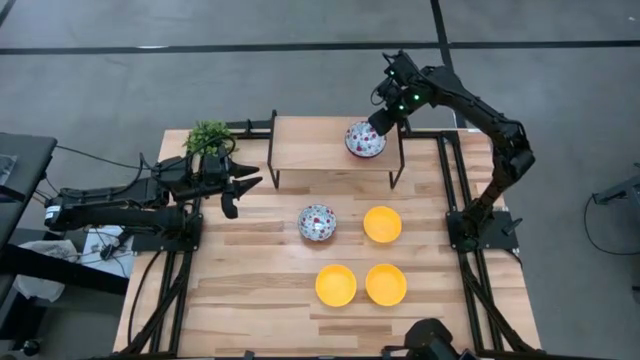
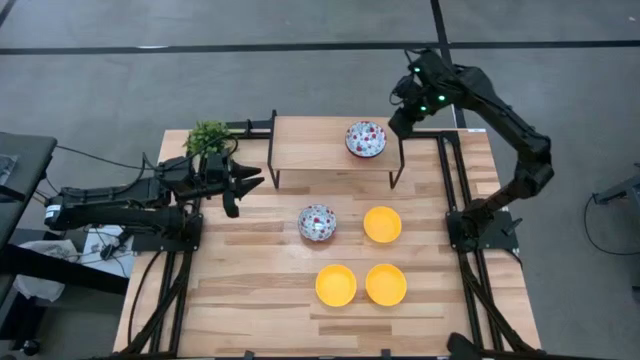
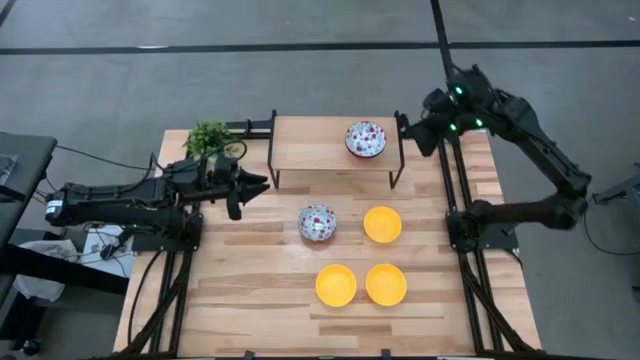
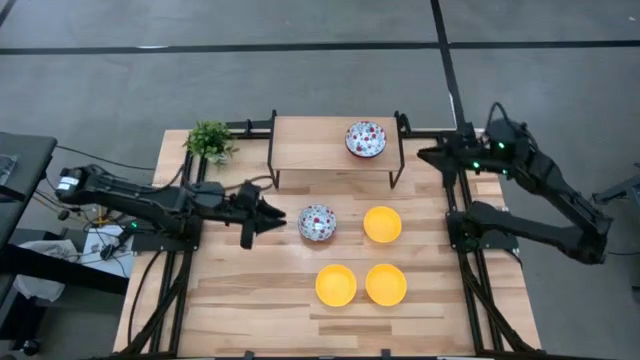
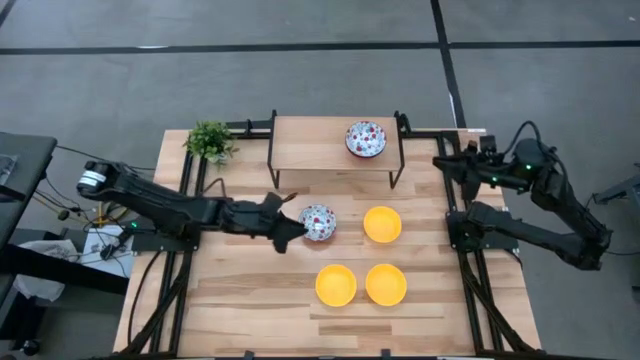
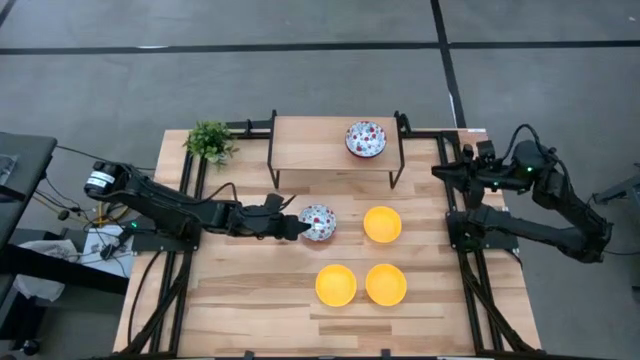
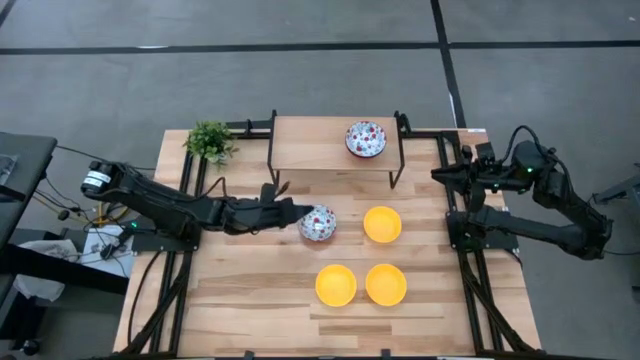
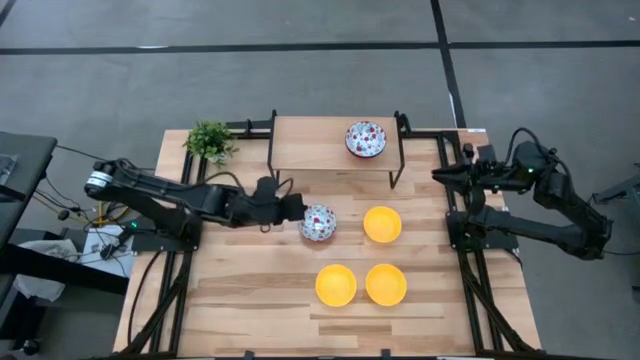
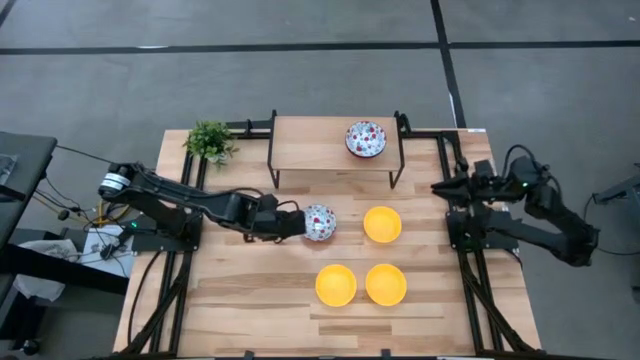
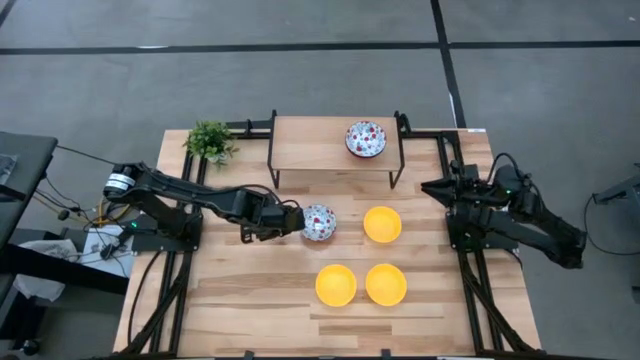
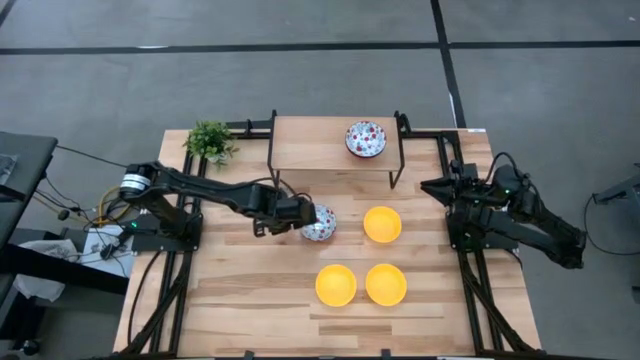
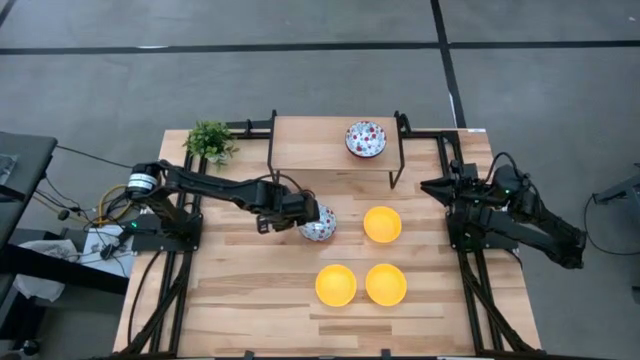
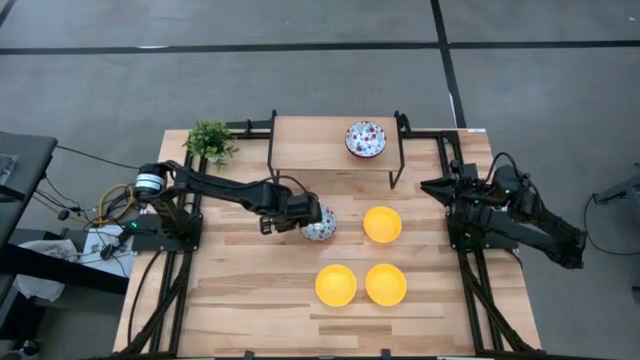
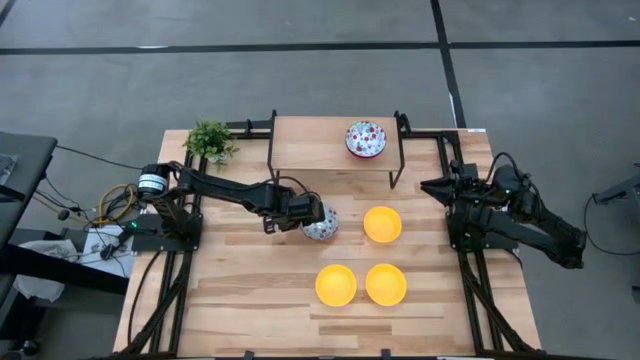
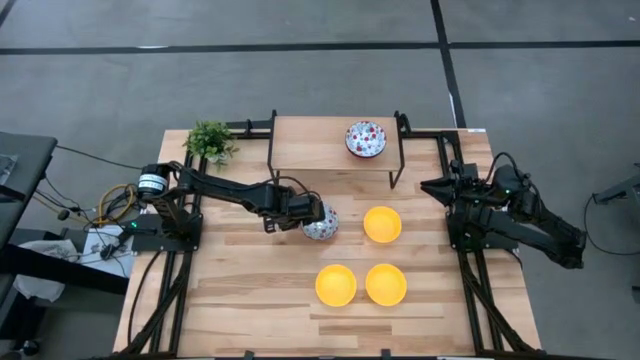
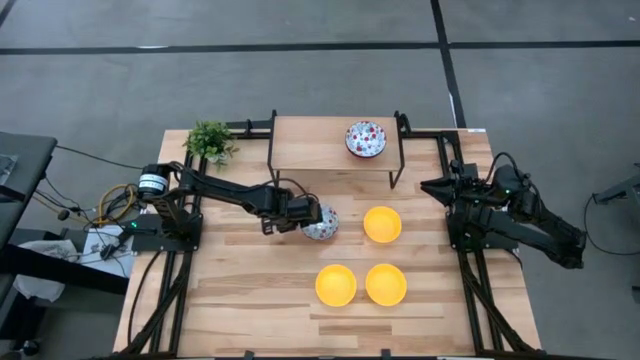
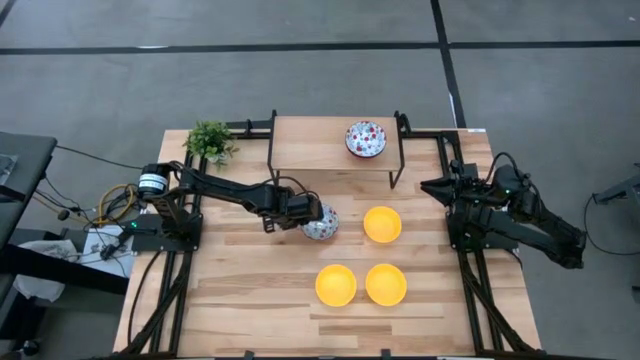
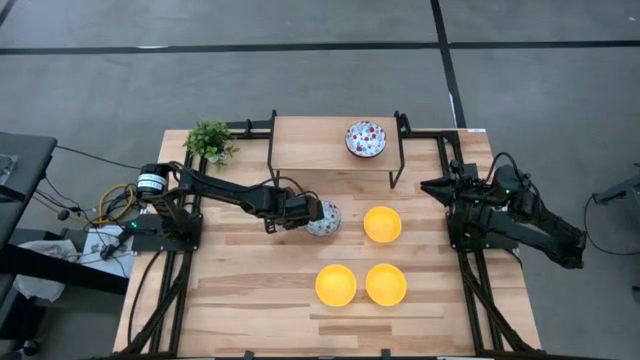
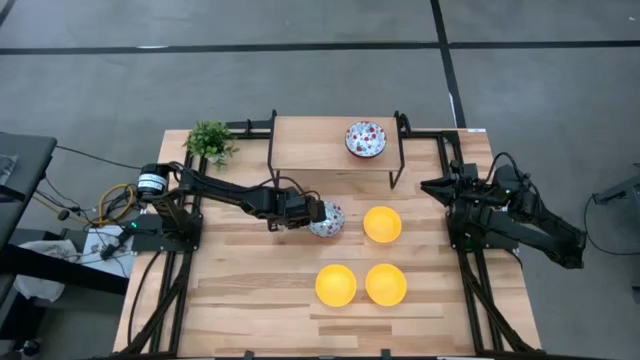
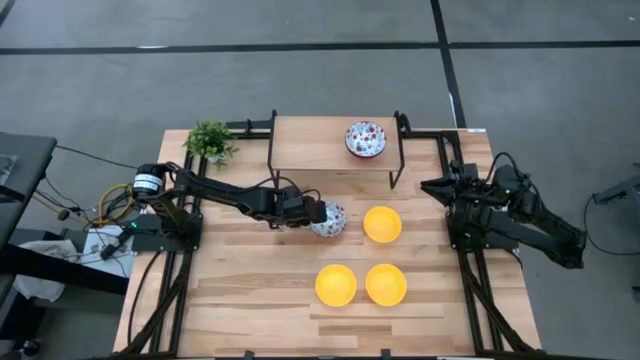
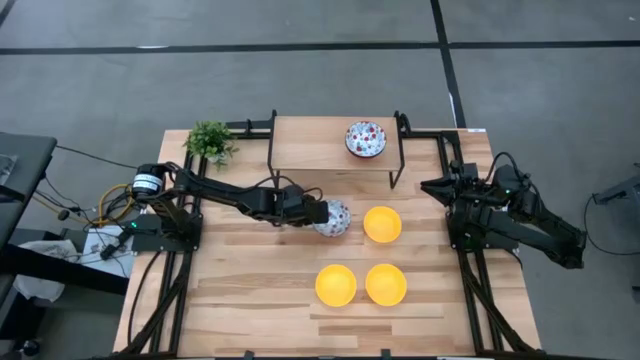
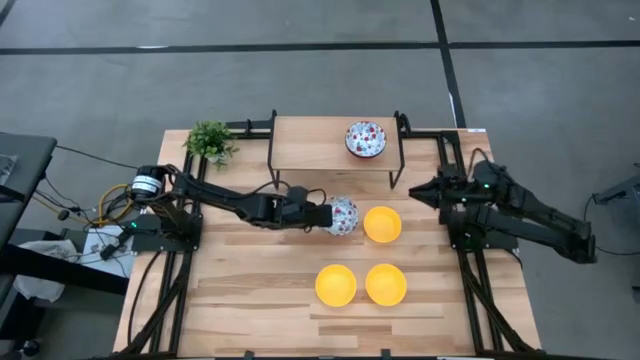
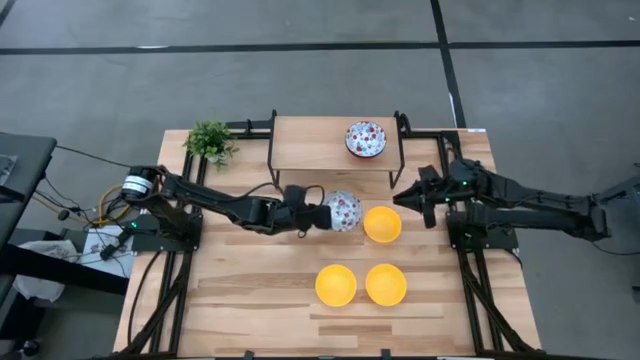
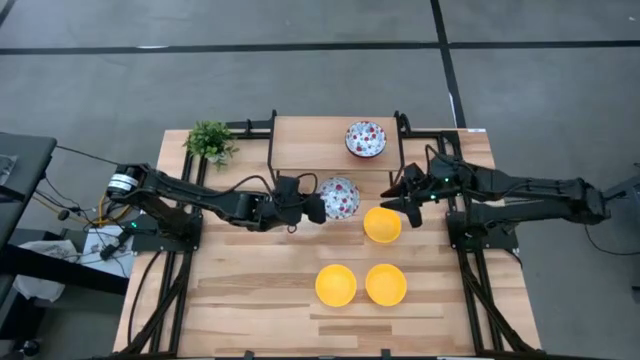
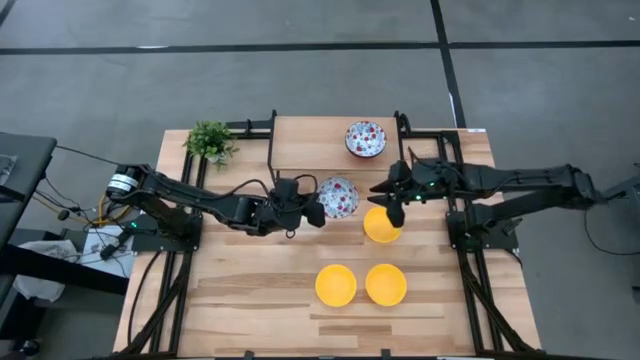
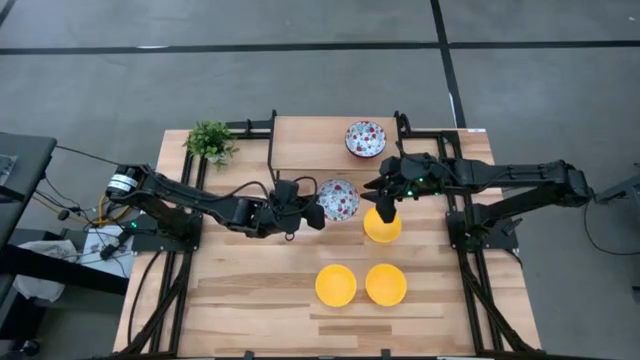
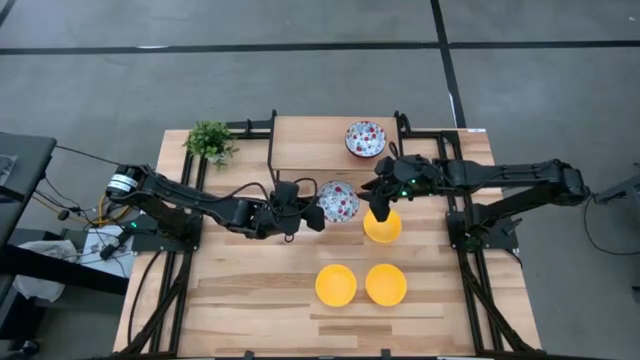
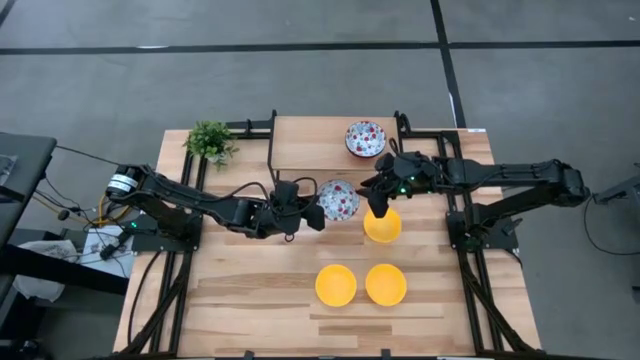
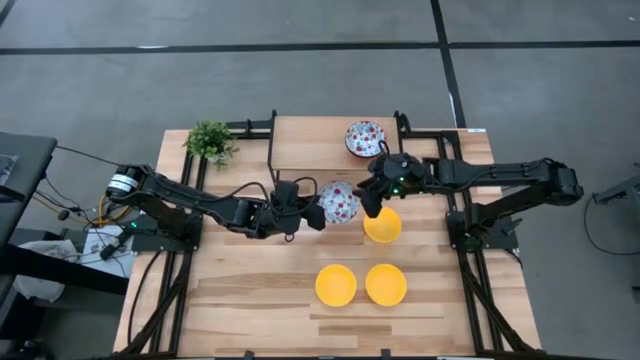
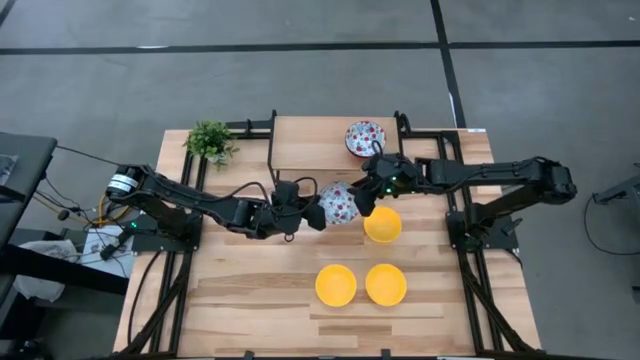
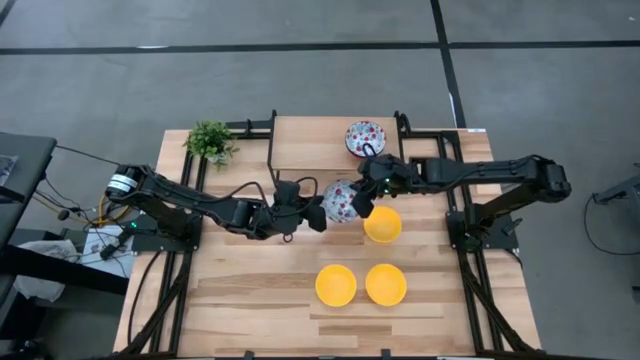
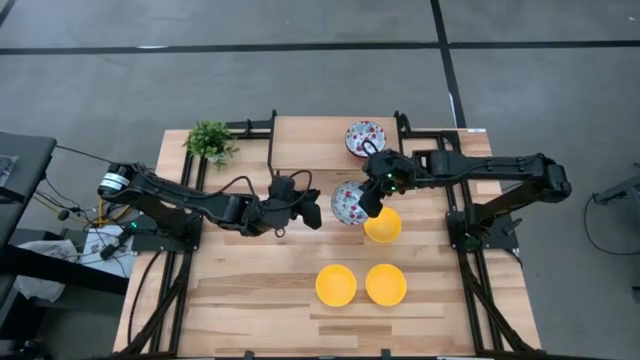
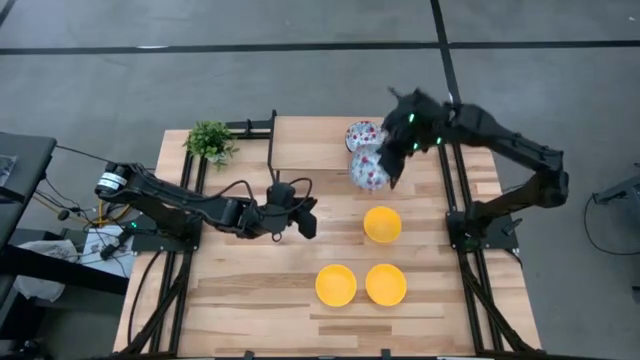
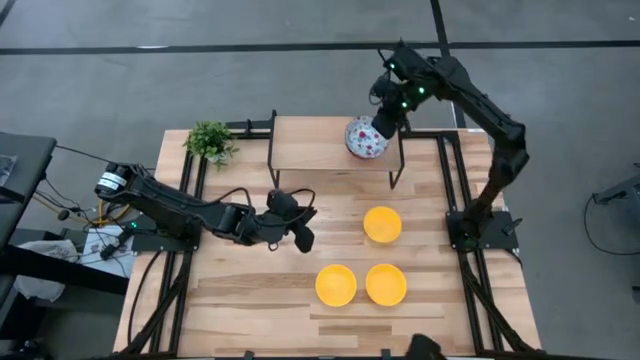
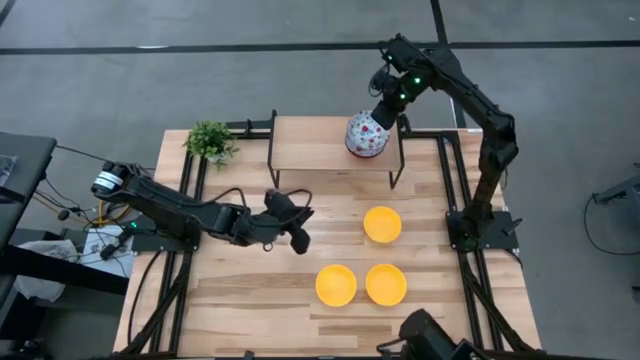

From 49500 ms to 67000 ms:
Task: Pick & Place Mini bowls
Stack the white bowl on top of the white bowls on the shelf

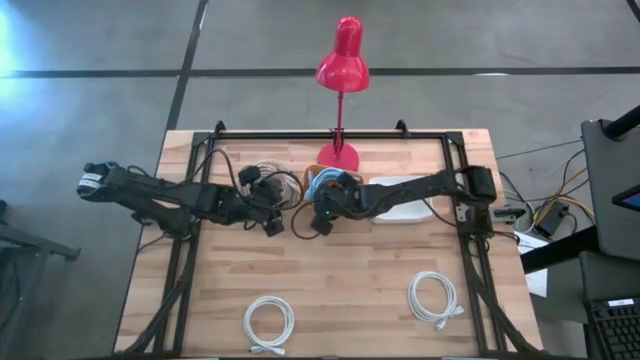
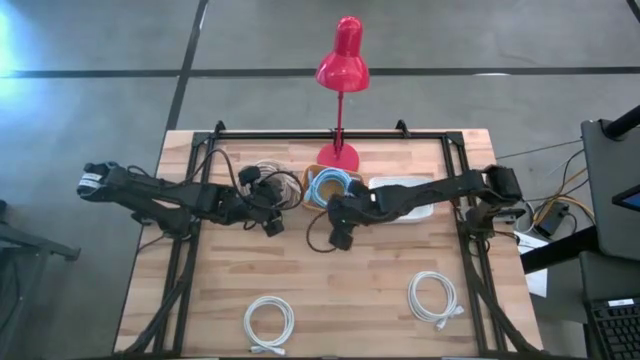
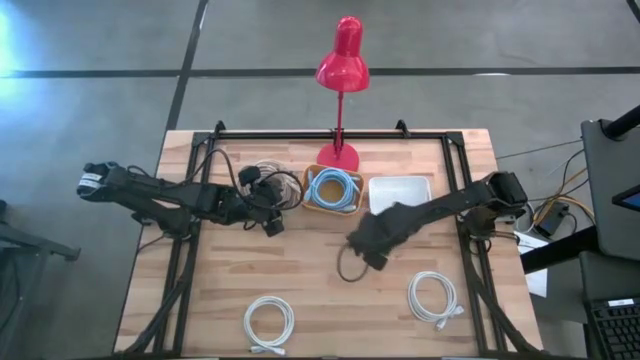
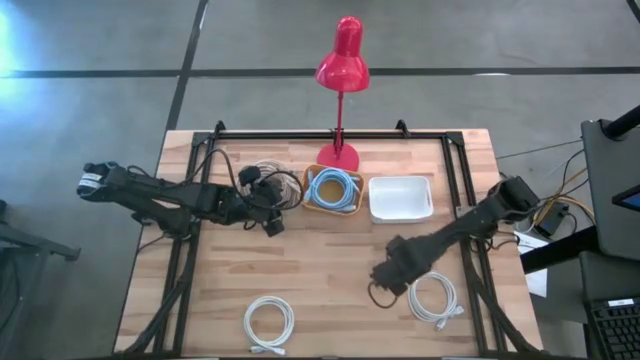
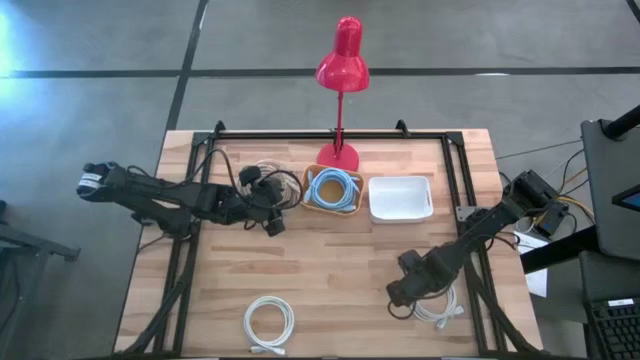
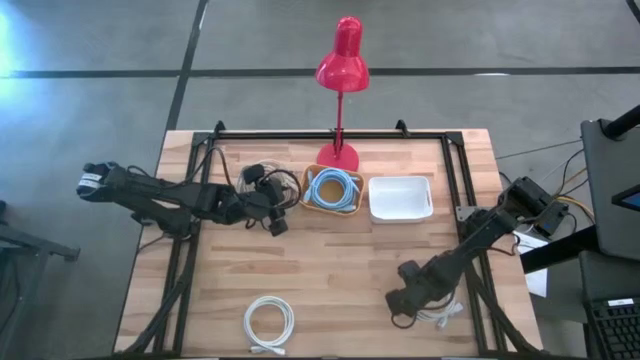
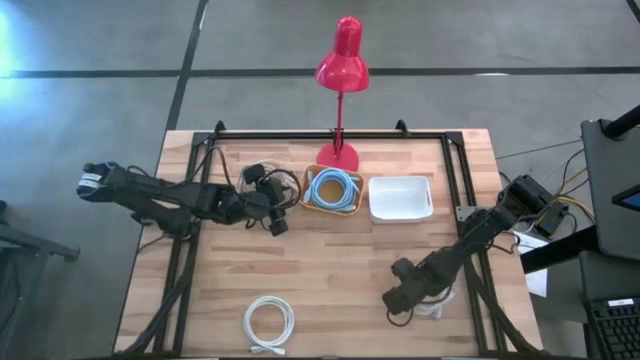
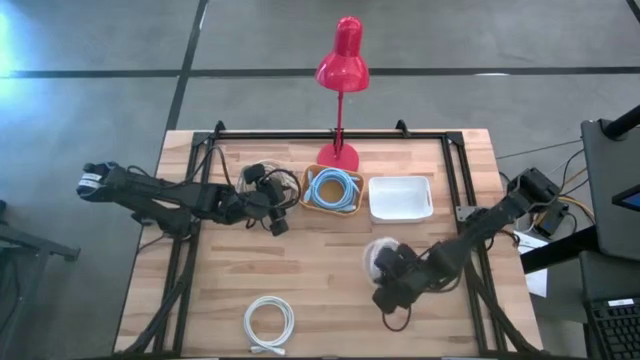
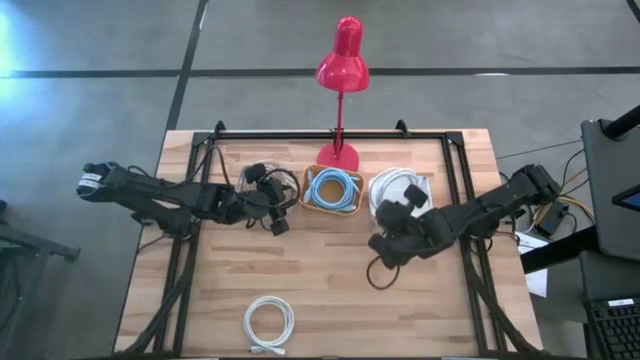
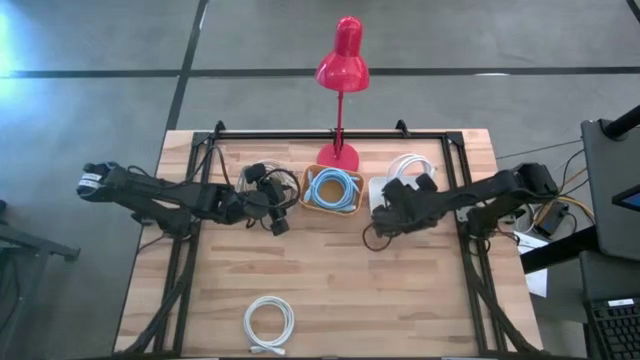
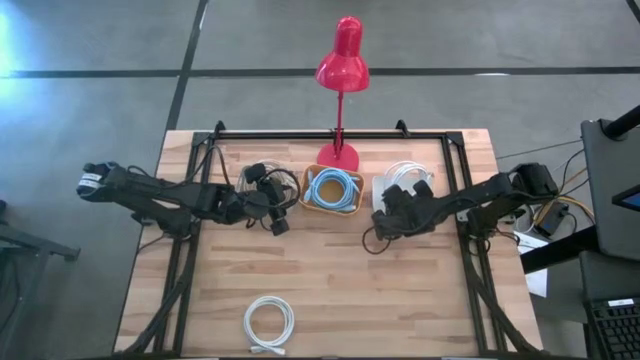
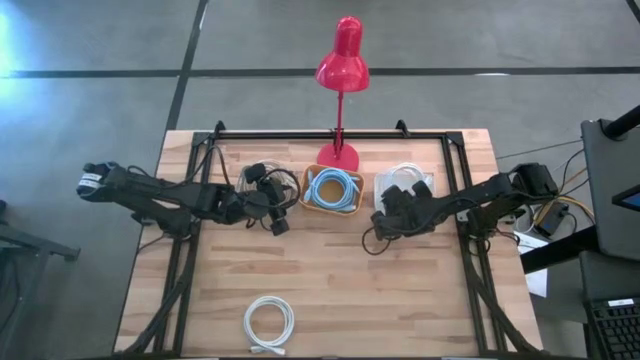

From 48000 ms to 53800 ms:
Task: Sort HDMI cables
Put the right white hdmi cable into the white bin
